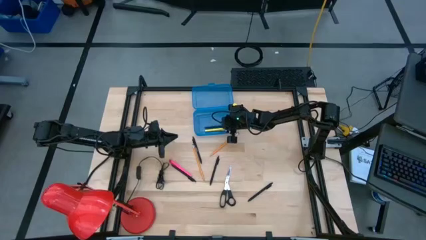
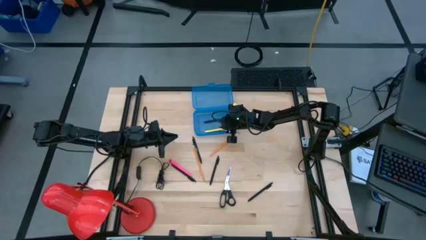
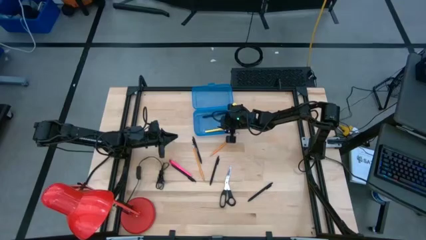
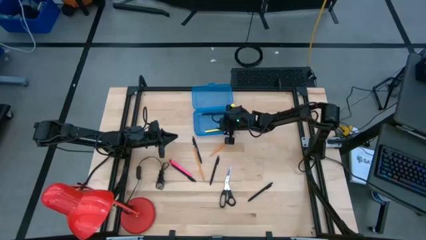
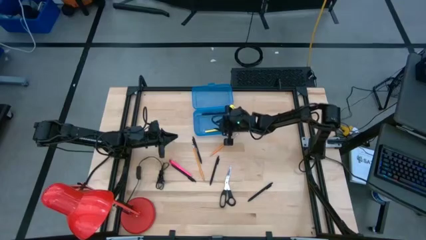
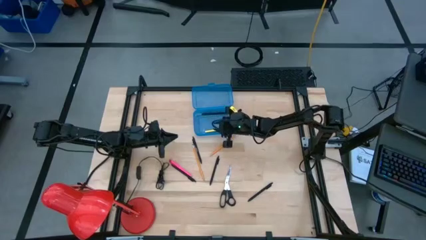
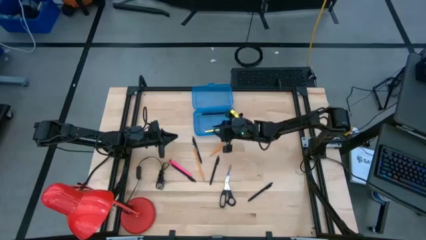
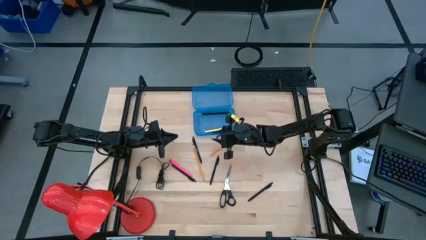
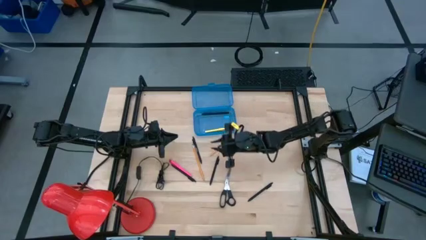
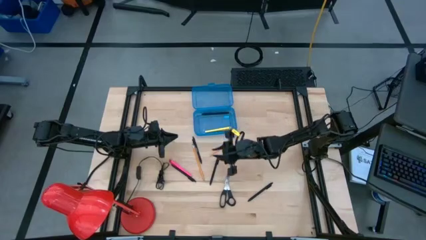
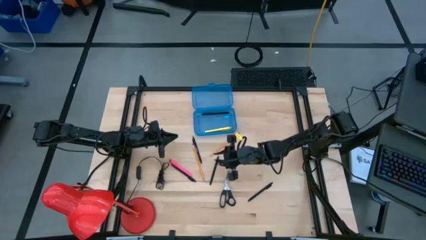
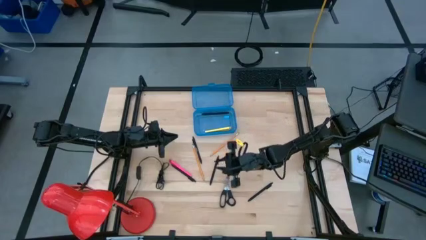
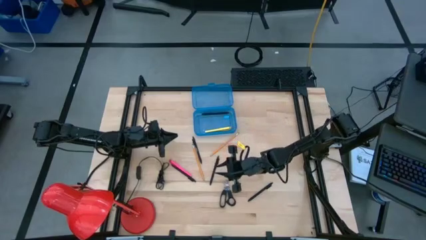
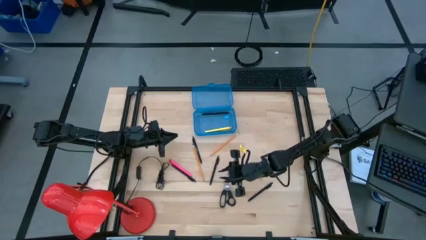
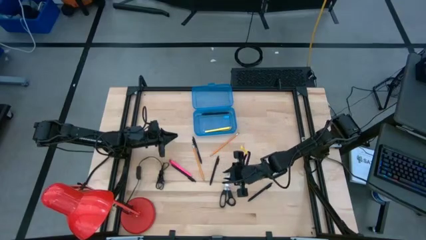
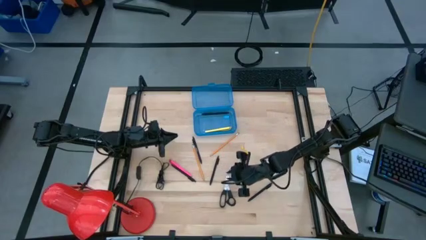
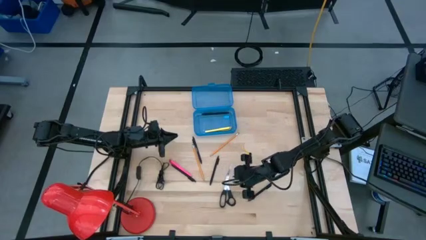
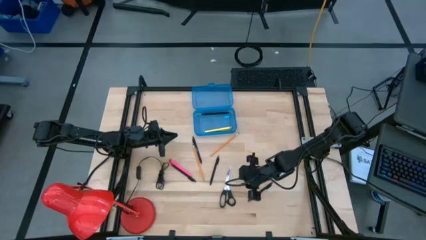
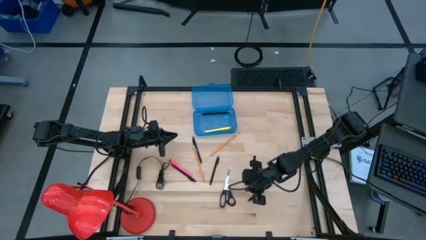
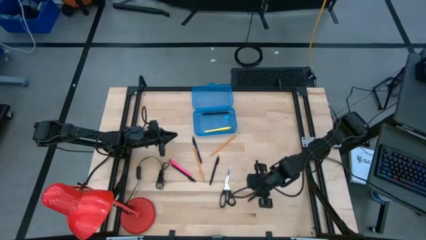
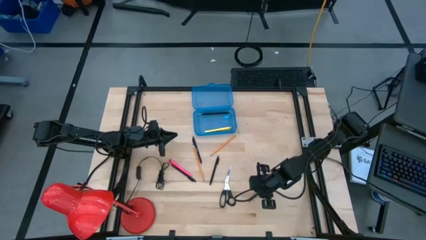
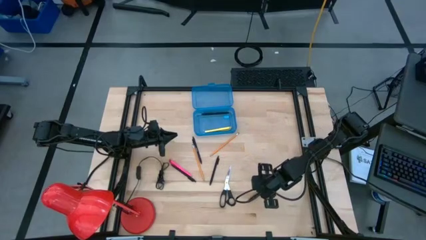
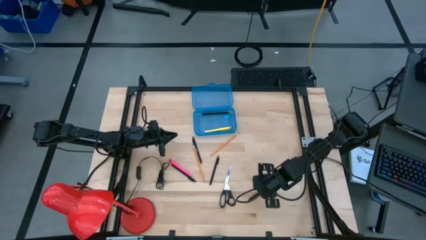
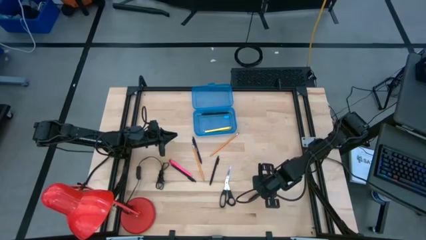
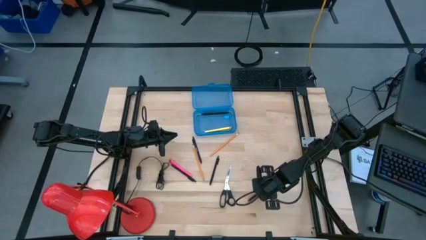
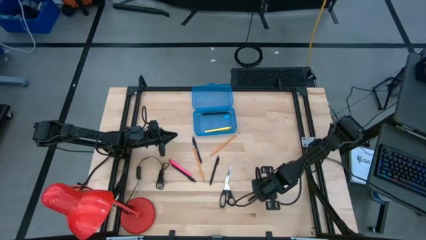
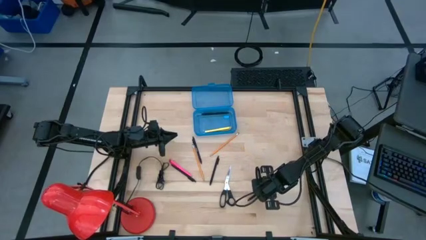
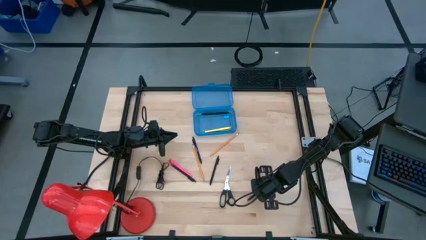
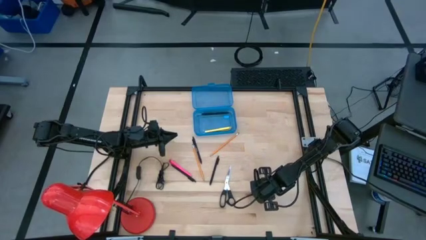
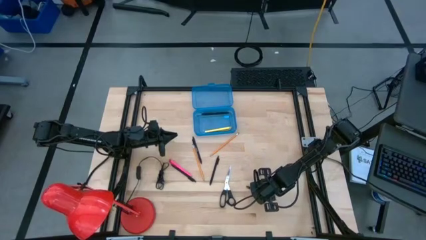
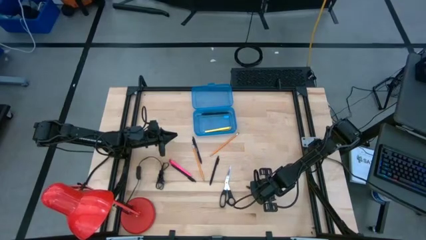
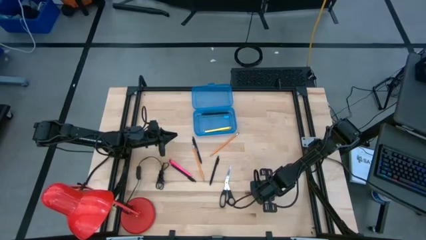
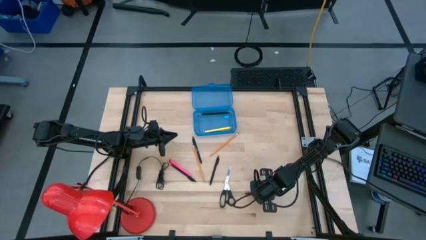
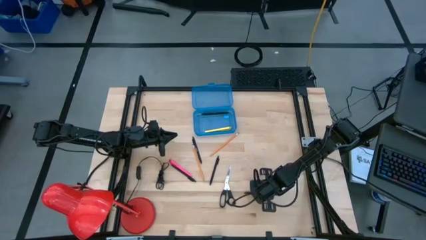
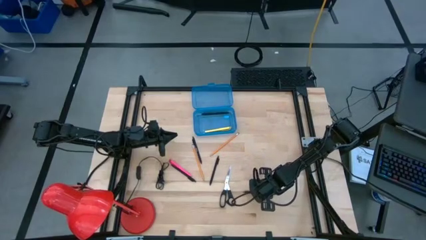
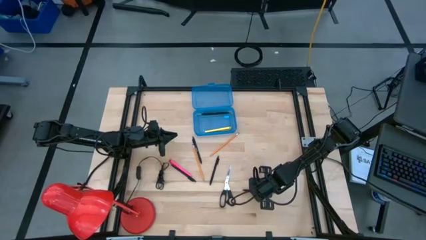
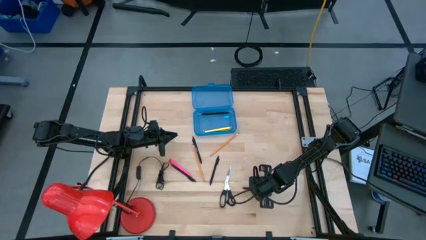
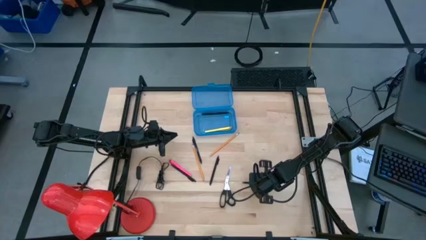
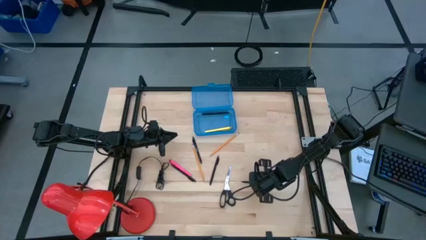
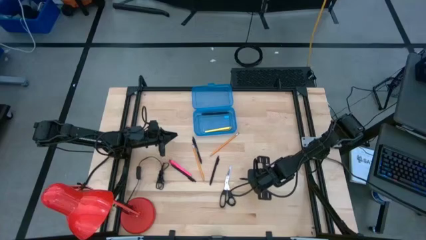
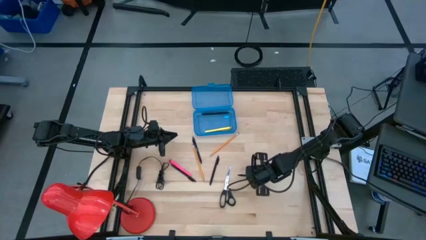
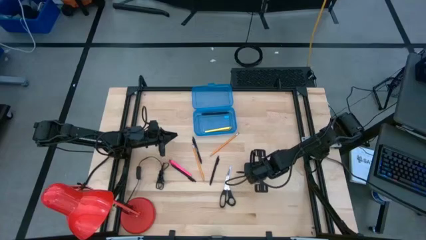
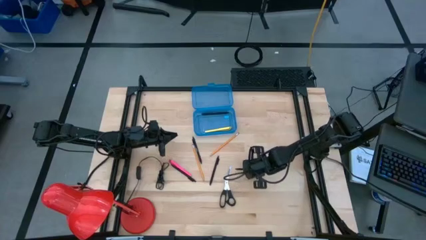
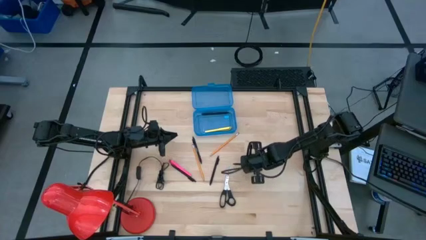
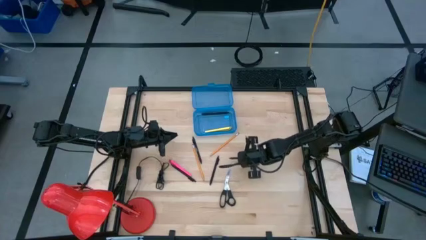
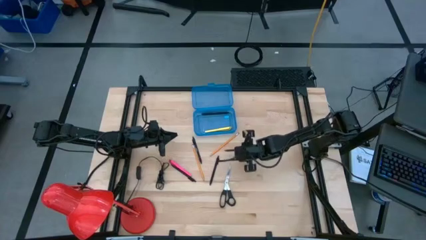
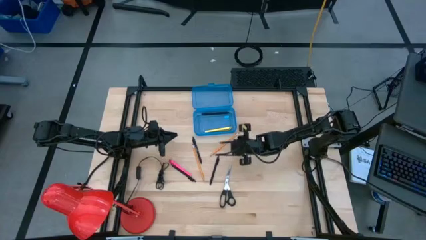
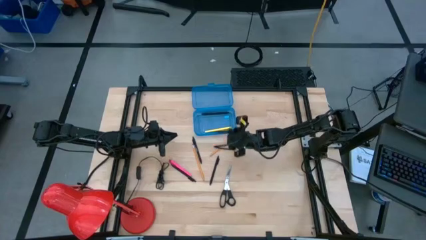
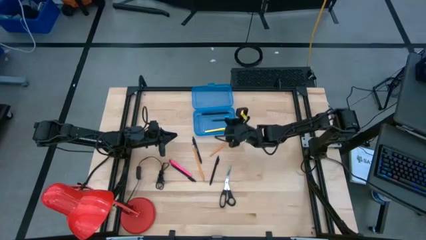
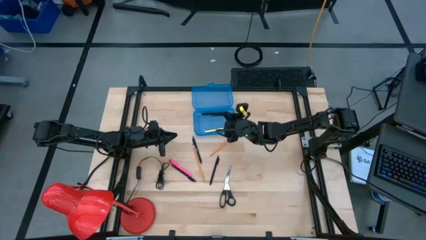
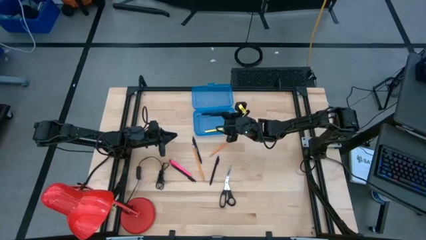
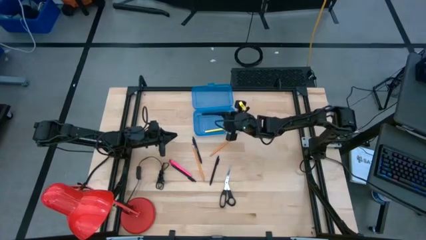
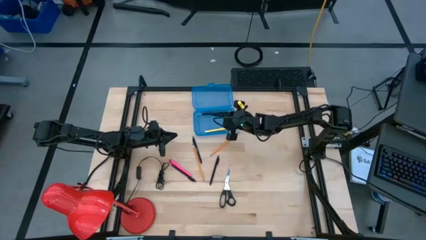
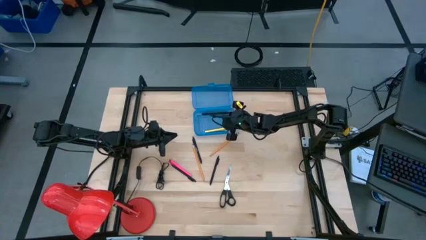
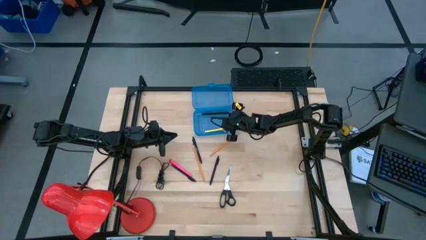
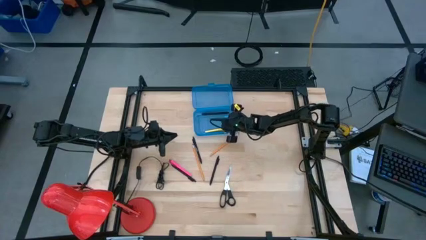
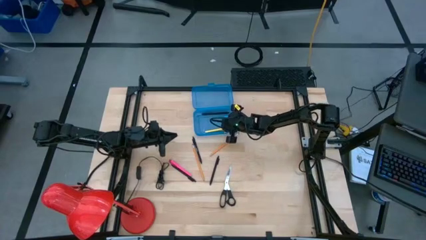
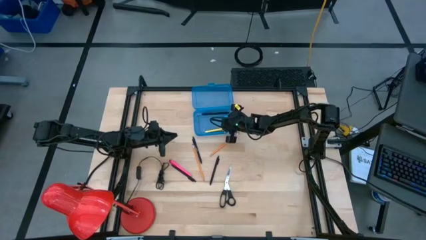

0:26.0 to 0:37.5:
Task: Pick & place school supplies into a supply box
Put the black pen into the blue supply box

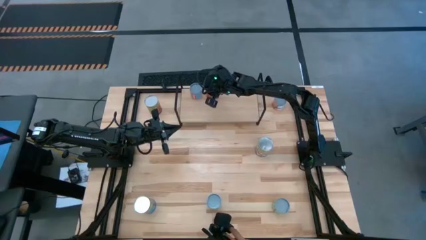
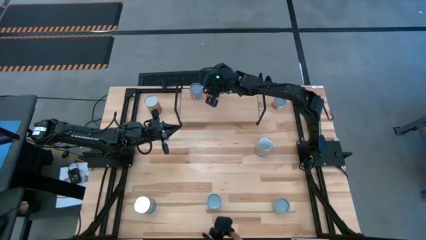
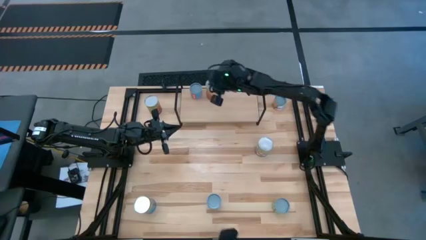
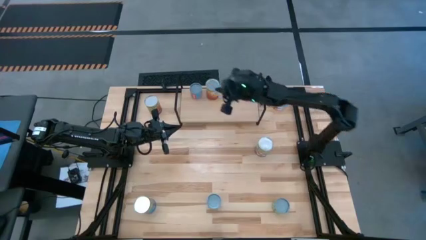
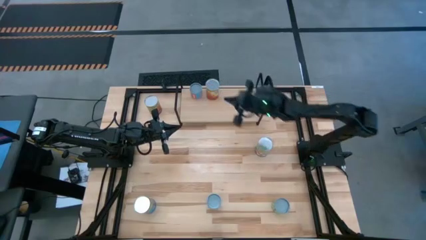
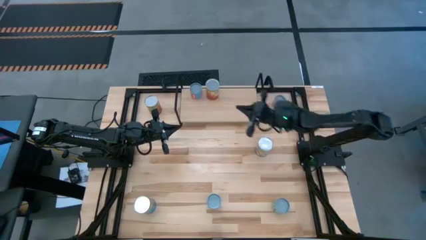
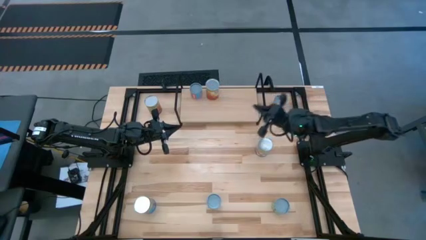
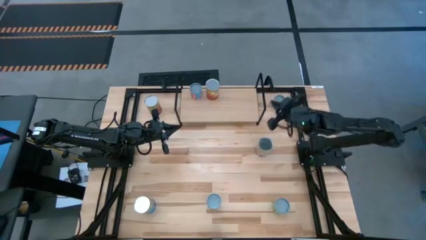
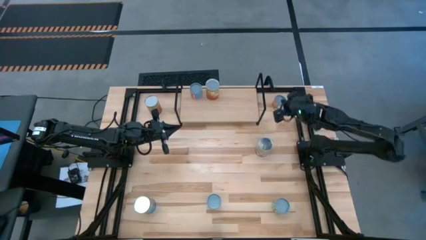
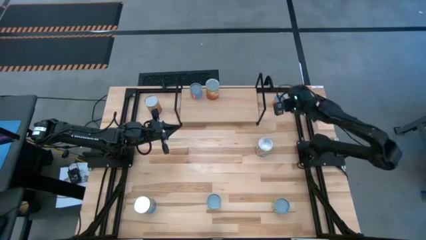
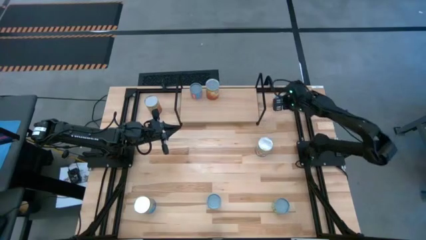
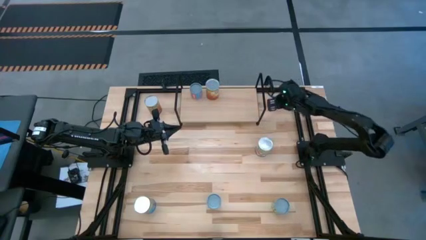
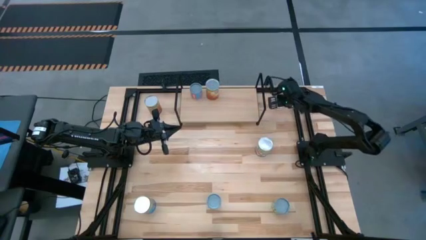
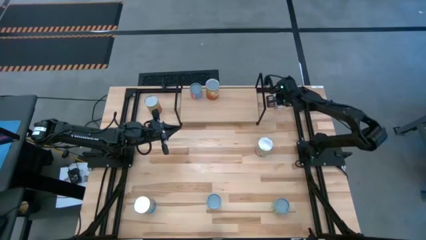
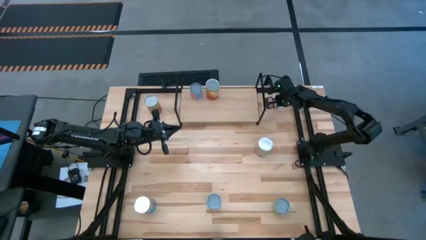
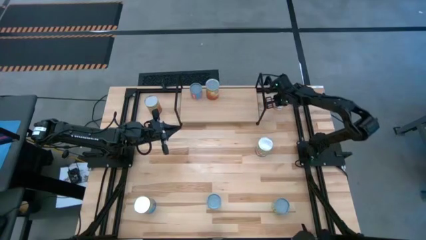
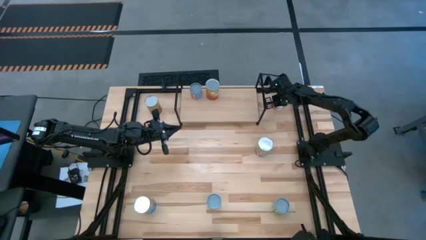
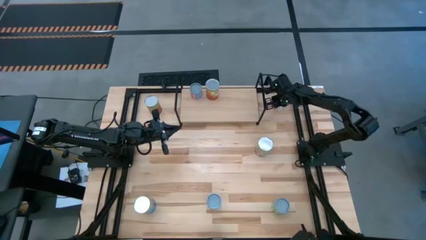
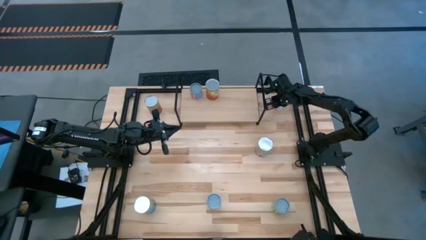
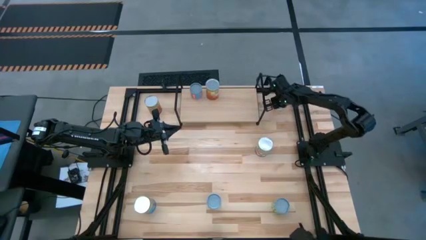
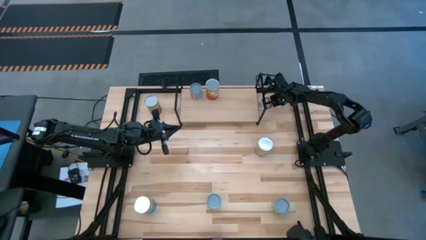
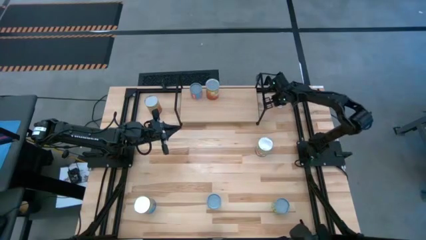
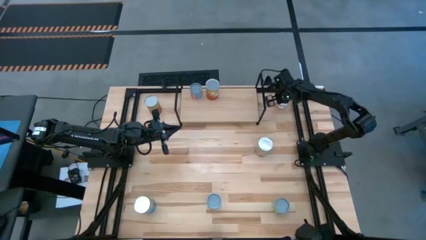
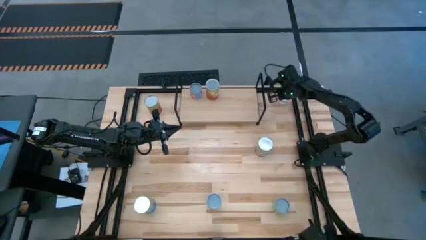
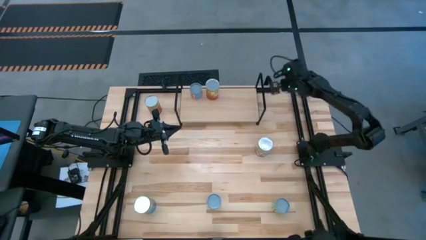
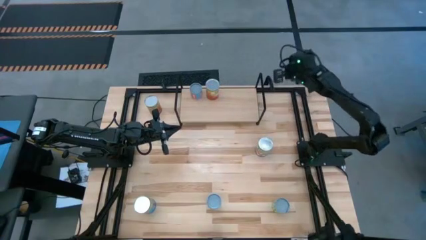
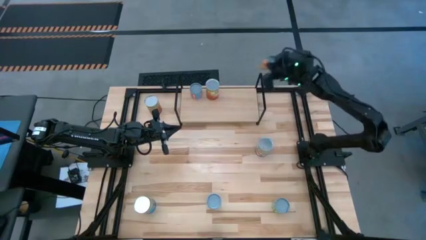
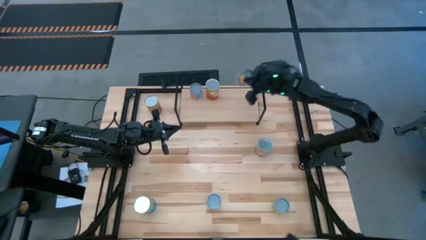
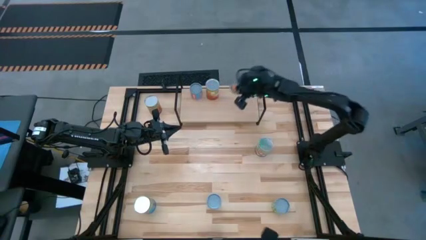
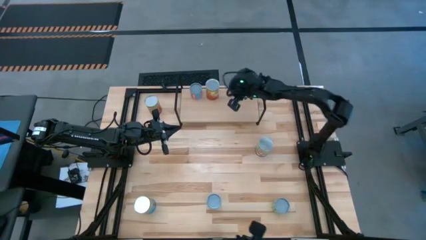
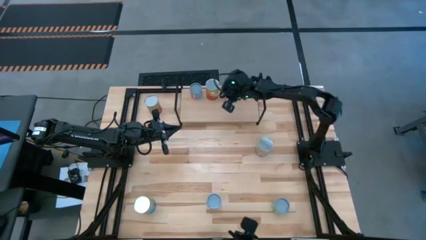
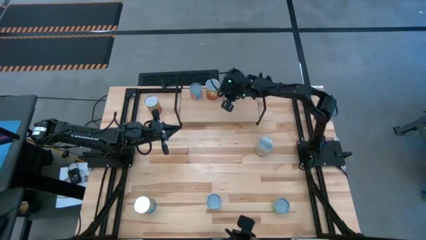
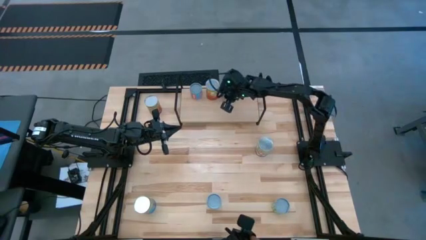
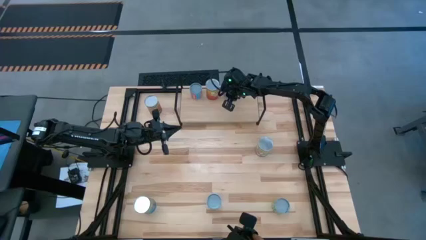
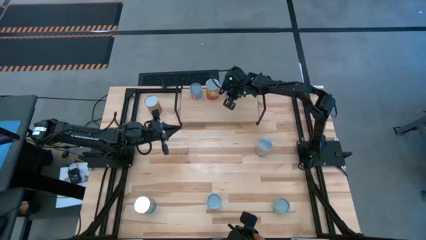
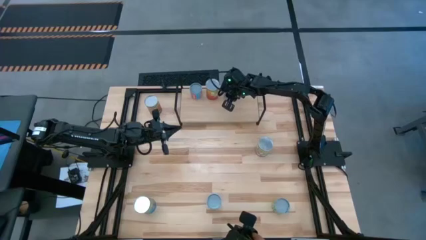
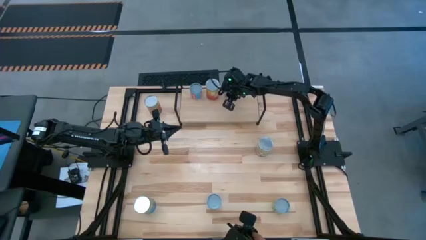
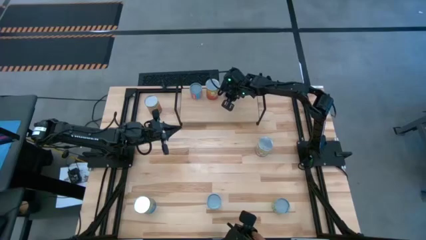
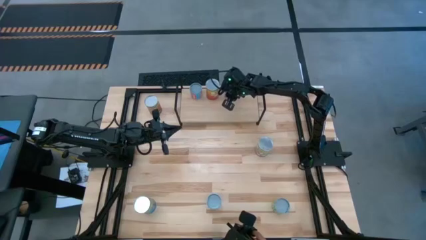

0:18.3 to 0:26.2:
Task: Pick and place cans onto a shelf
Put the green can on the shelf
